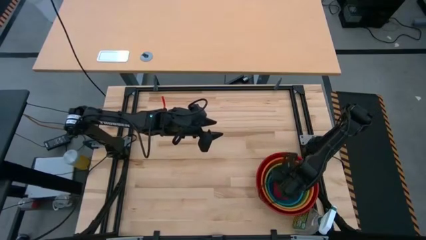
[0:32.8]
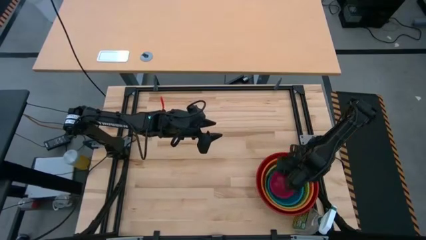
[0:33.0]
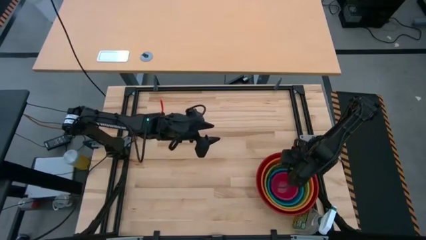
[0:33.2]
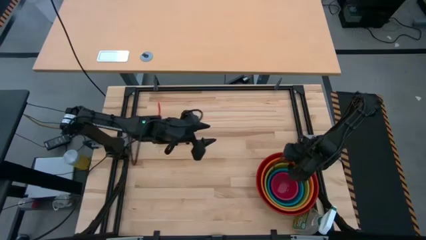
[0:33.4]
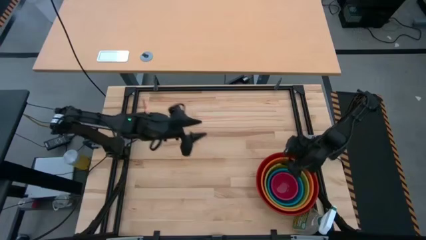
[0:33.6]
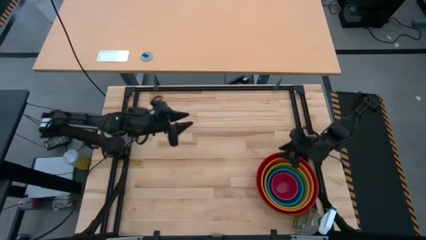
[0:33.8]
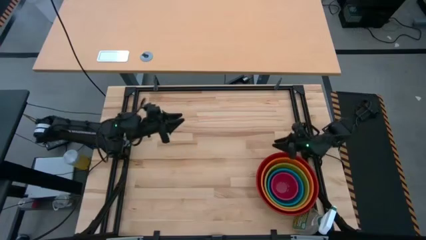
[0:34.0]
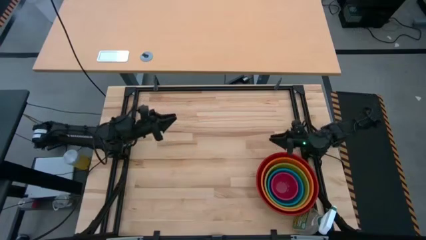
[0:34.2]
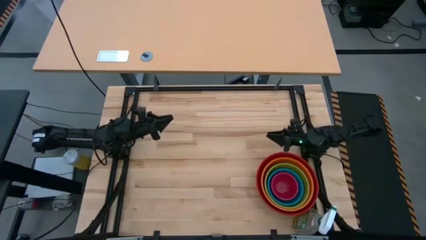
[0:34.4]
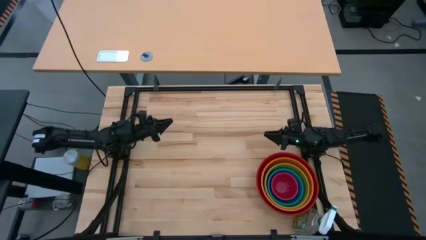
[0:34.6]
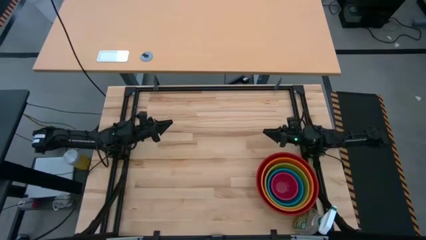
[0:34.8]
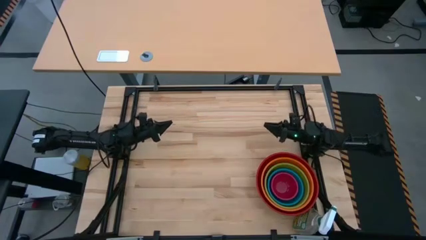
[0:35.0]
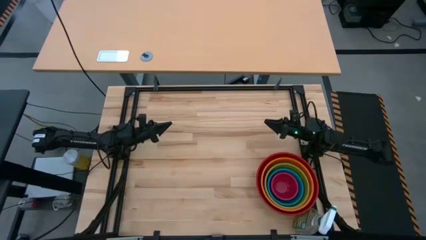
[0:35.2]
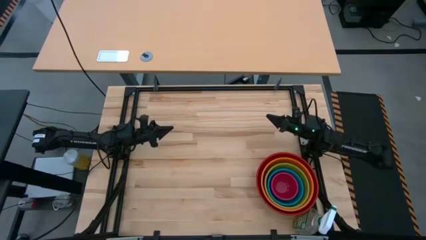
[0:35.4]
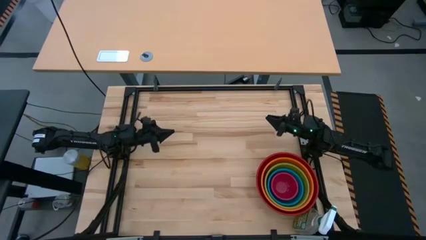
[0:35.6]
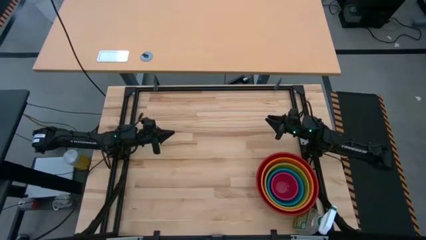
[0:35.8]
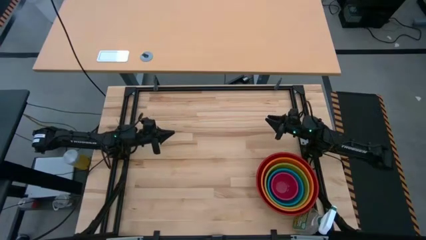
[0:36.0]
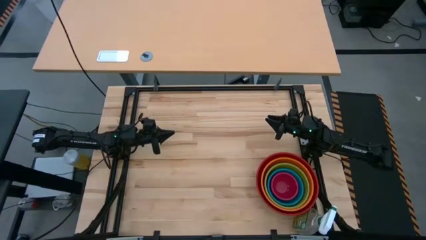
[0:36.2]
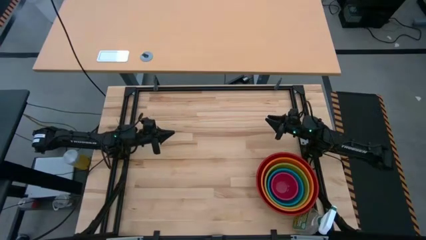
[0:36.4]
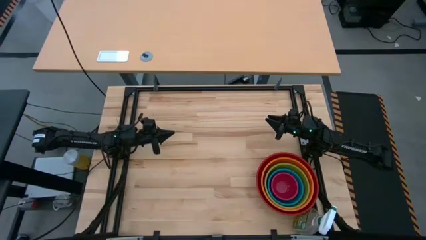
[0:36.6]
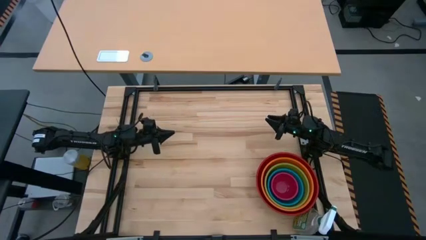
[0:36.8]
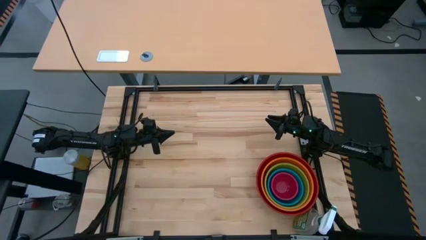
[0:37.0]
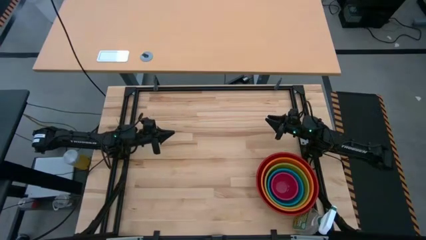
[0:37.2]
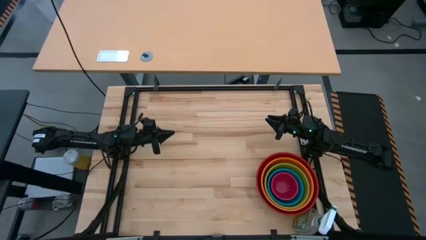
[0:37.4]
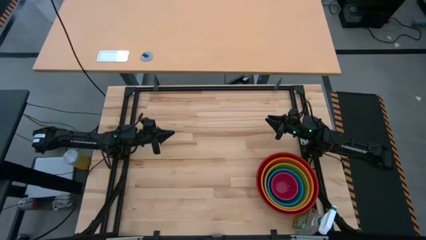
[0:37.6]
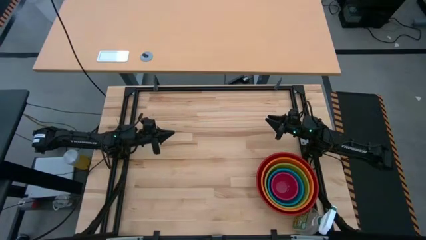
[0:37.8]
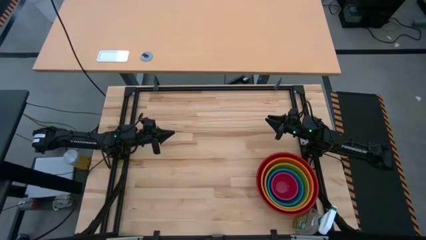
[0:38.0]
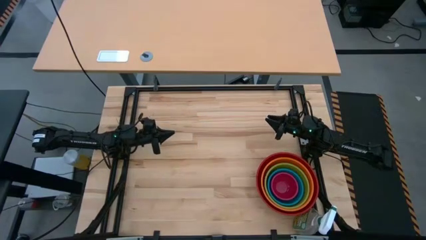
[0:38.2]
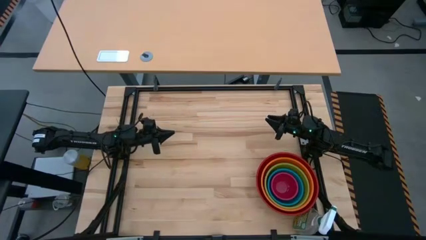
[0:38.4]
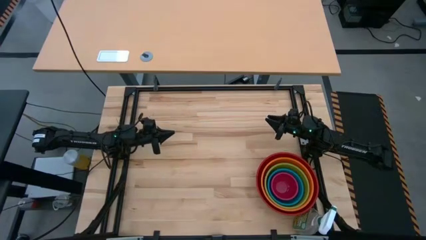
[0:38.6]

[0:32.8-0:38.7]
Return to Home Position

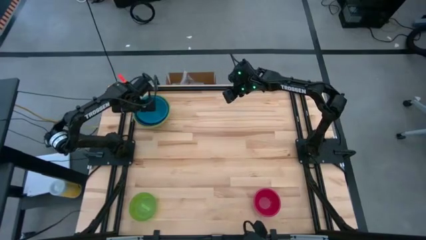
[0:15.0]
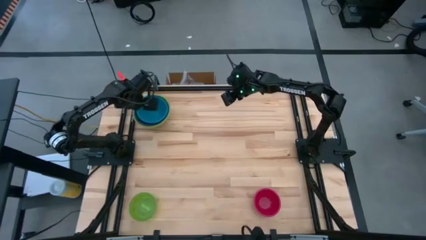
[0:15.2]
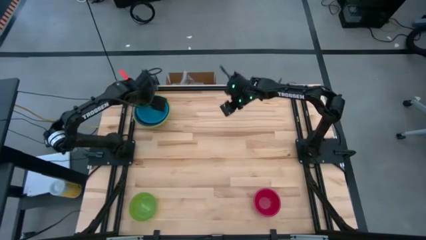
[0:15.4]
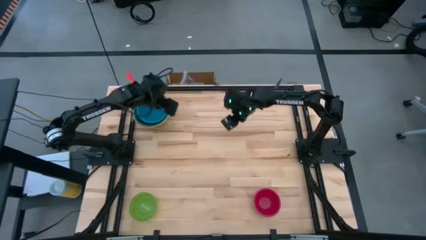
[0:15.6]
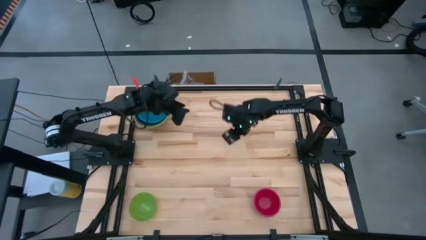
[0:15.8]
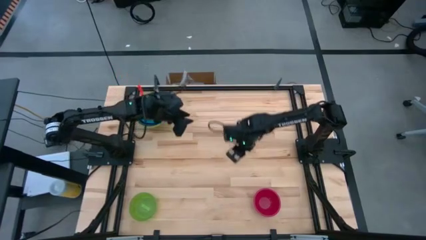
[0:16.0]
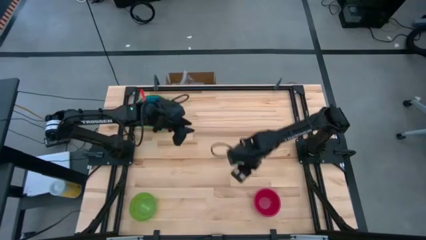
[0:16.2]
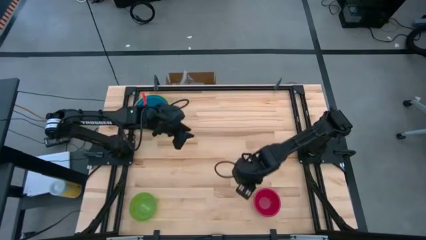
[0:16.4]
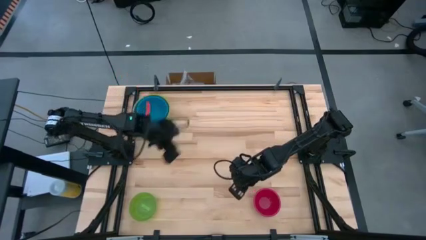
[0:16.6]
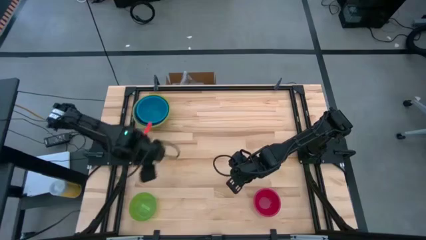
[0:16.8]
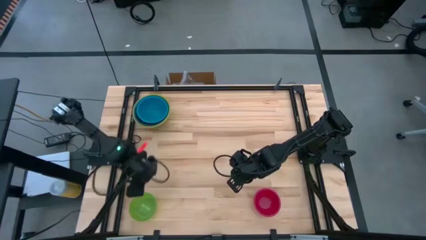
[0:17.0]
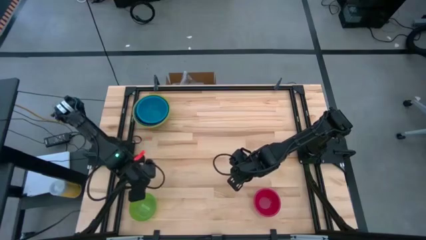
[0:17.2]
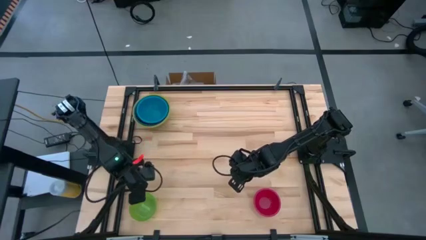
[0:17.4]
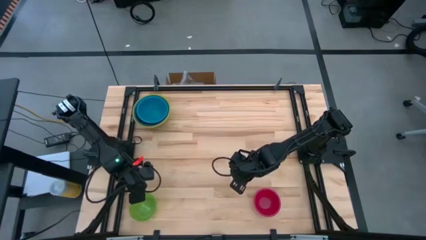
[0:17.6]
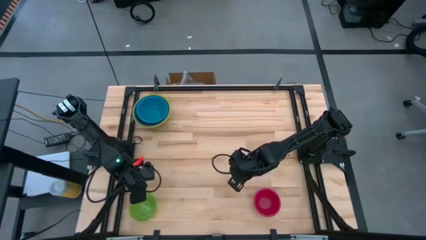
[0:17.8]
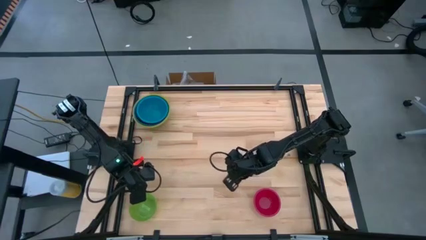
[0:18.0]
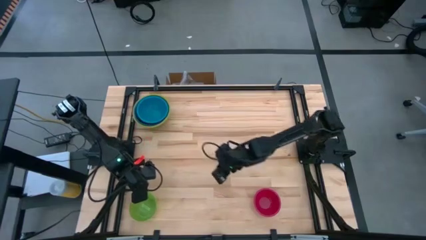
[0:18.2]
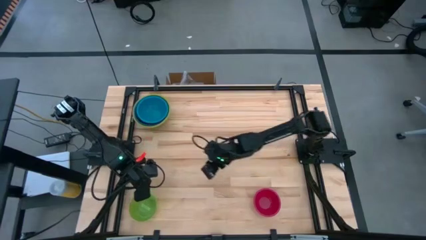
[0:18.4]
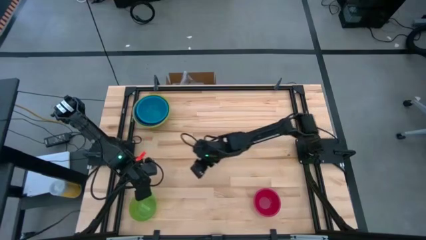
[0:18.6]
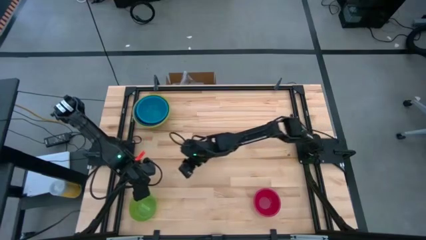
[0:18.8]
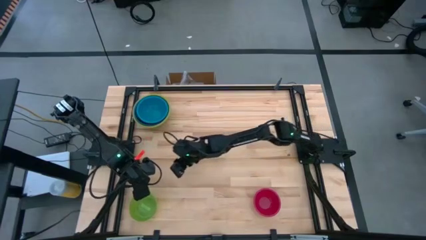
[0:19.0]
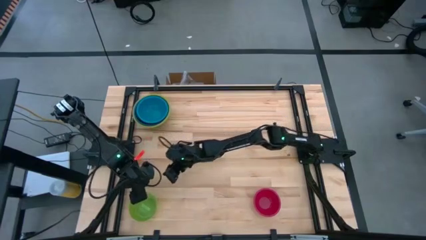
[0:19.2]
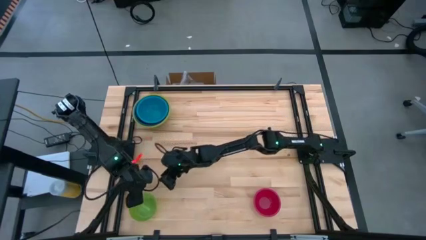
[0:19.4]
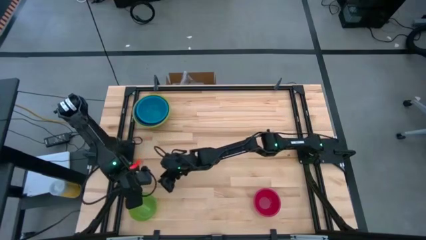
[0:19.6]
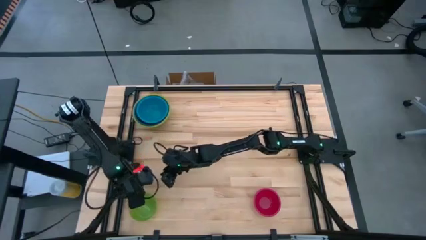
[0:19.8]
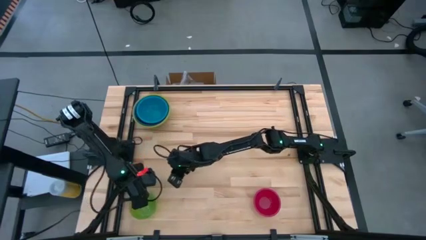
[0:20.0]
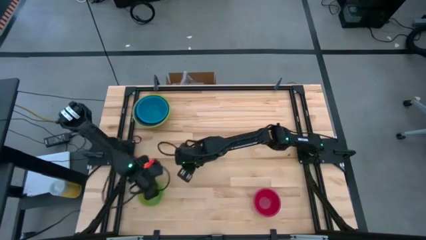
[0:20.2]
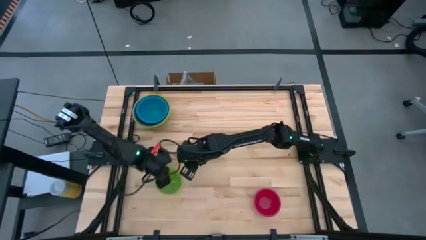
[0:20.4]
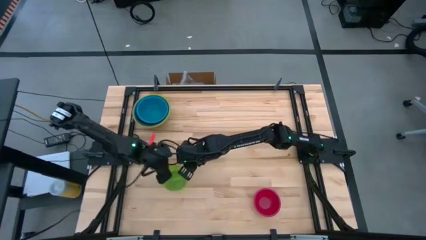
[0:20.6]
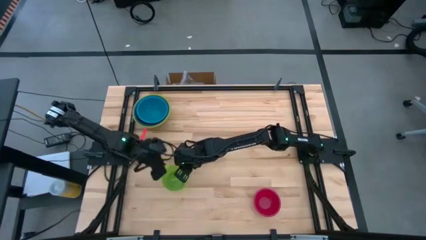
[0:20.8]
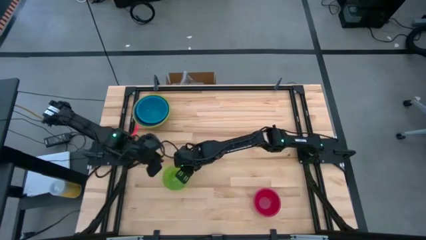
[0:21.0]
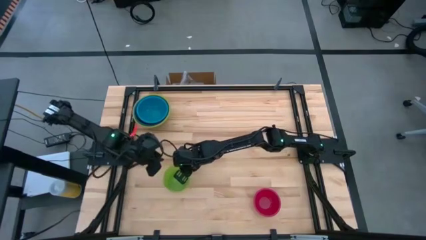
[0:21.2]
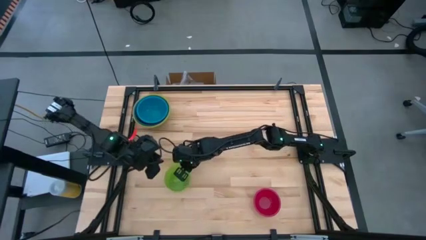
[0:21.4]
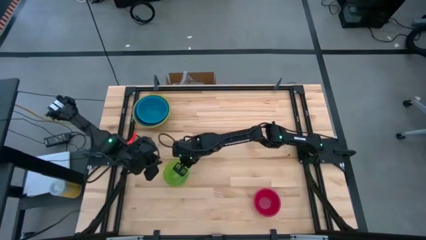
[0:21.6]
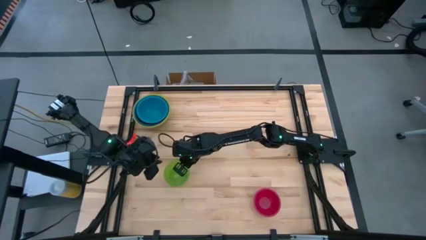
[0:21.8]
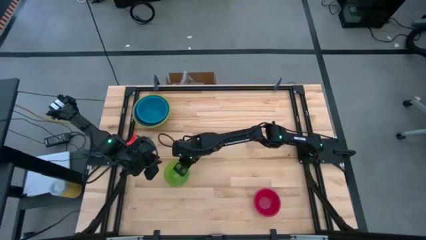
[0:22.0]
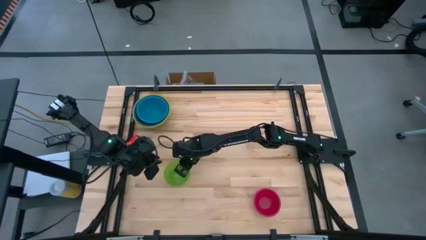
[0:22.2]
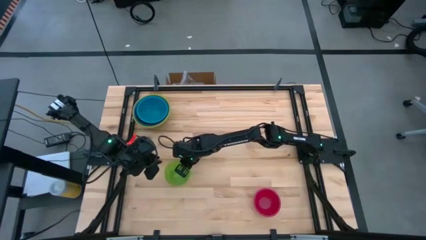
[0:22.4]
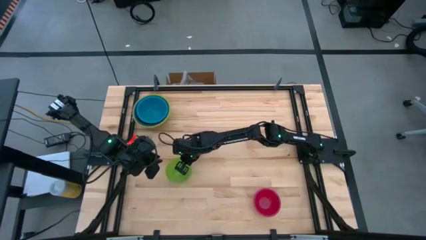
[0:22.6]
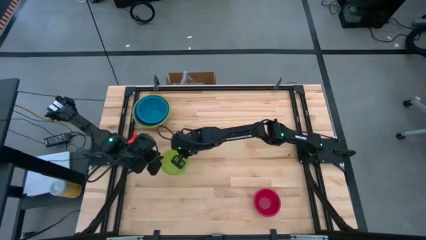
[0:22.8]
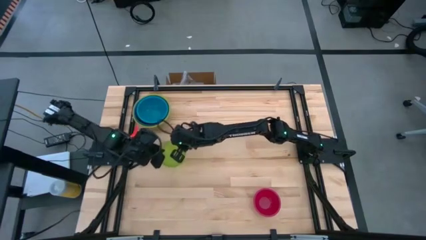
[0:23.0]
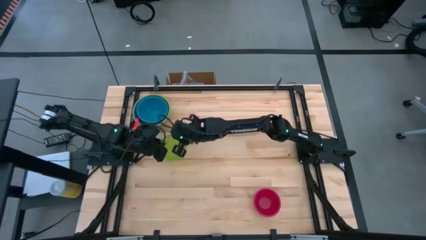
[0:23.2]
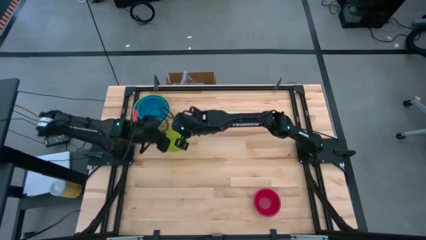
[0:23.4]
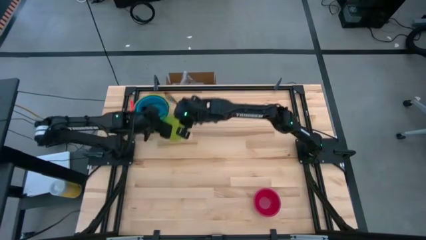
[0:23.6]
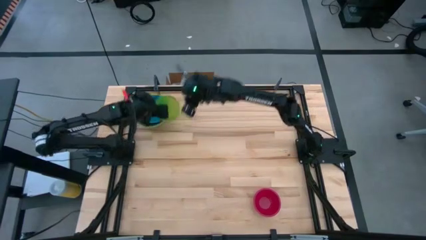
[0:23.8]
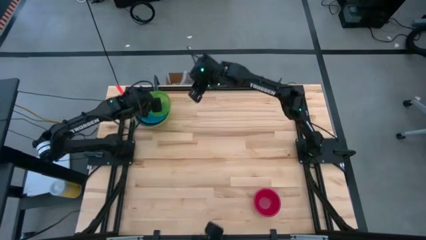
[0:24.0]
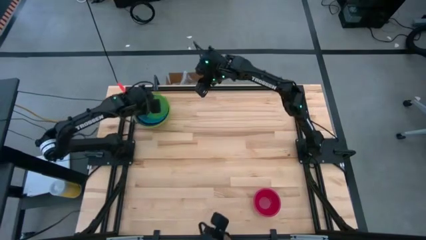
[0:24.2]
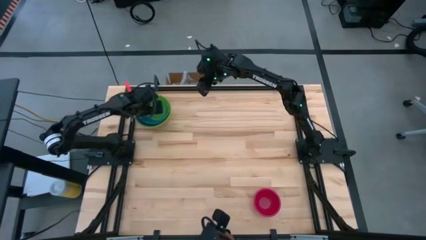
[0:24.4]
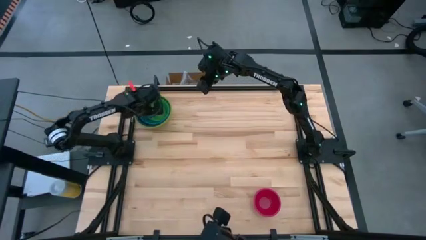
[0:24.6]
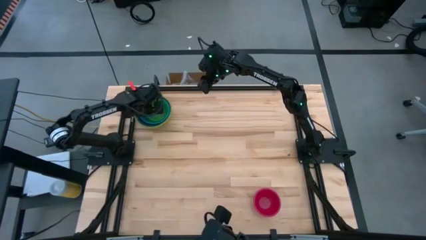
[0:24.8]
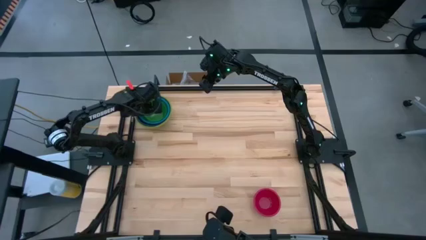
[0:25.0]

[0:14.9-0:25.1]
Stack the green bowl on top of the blue bowl
